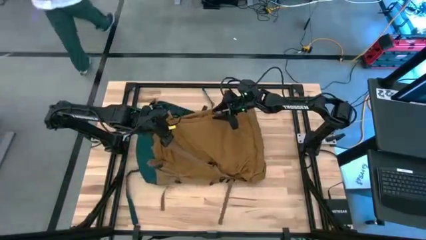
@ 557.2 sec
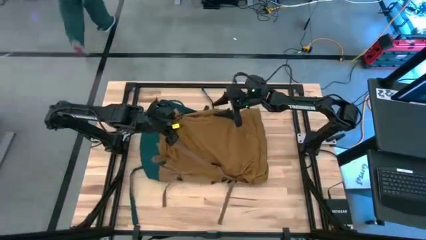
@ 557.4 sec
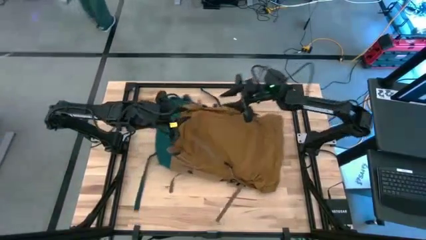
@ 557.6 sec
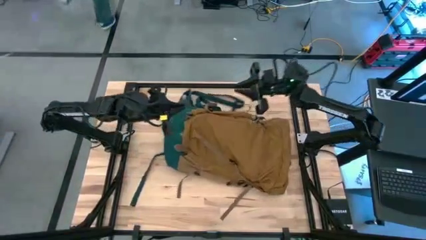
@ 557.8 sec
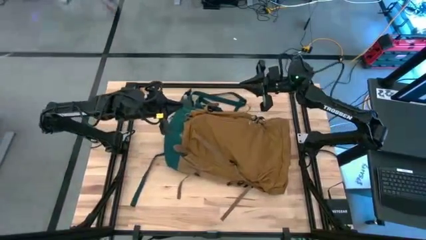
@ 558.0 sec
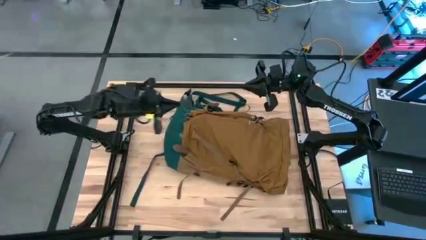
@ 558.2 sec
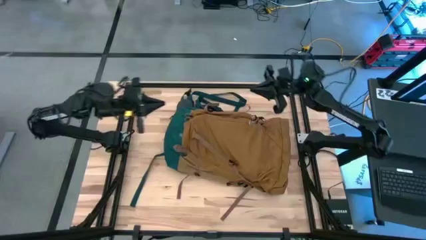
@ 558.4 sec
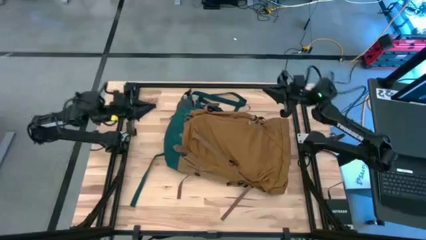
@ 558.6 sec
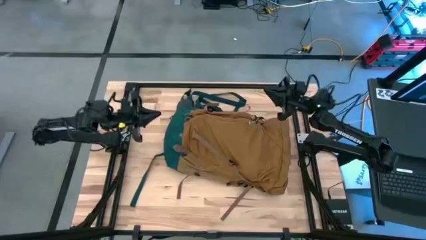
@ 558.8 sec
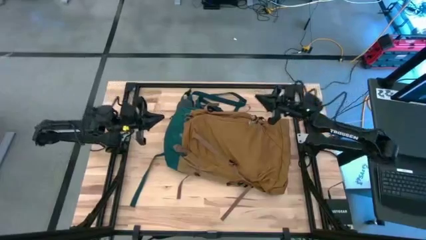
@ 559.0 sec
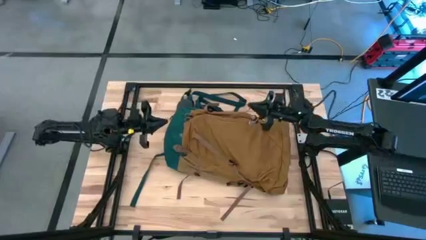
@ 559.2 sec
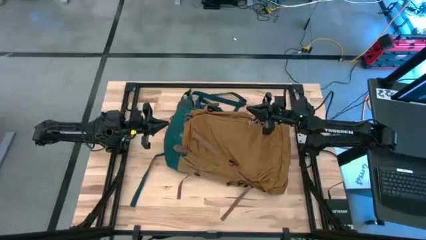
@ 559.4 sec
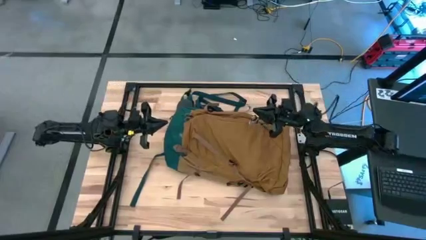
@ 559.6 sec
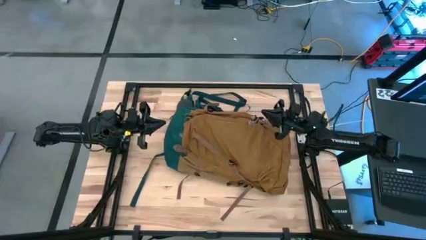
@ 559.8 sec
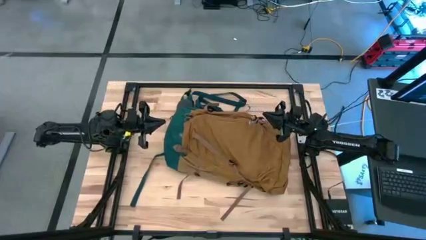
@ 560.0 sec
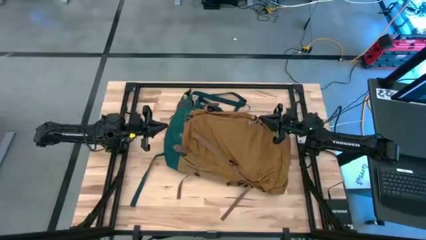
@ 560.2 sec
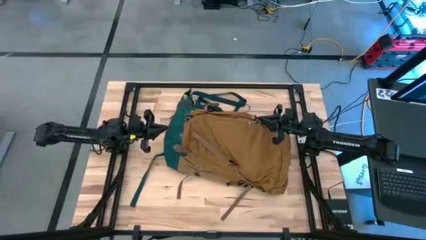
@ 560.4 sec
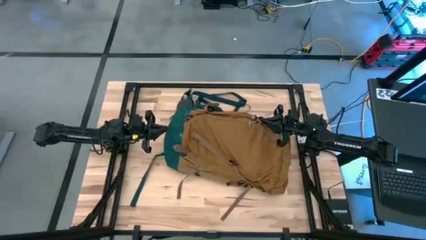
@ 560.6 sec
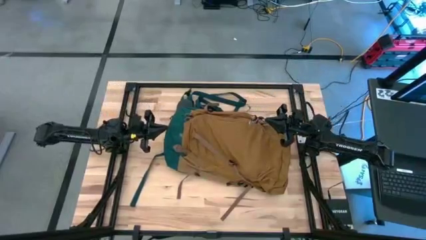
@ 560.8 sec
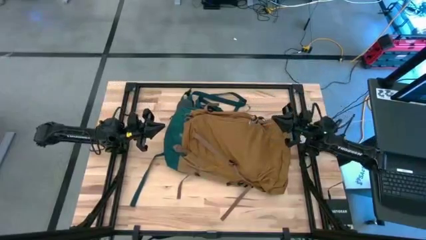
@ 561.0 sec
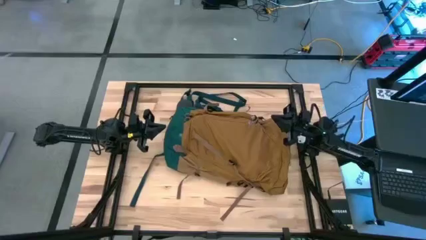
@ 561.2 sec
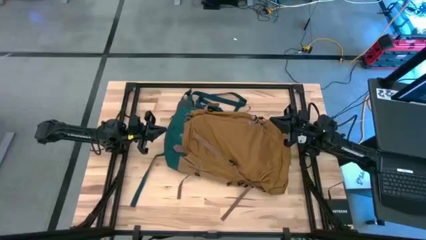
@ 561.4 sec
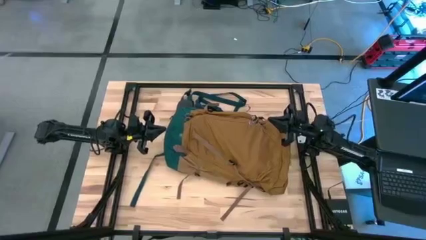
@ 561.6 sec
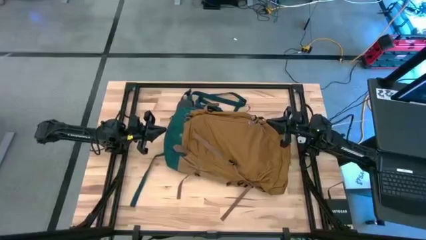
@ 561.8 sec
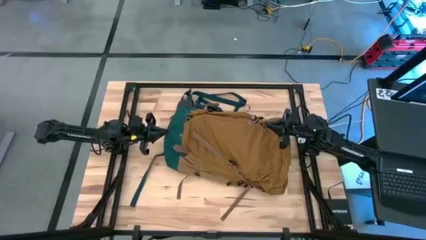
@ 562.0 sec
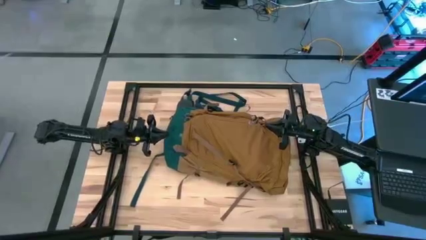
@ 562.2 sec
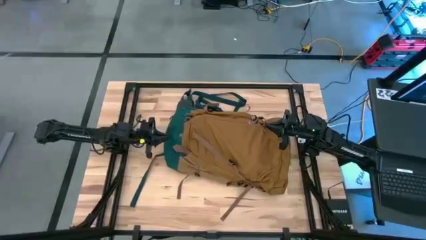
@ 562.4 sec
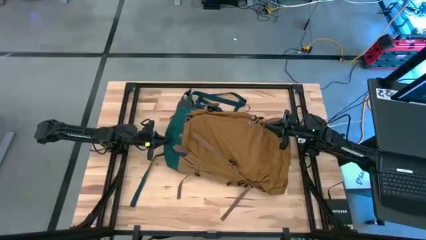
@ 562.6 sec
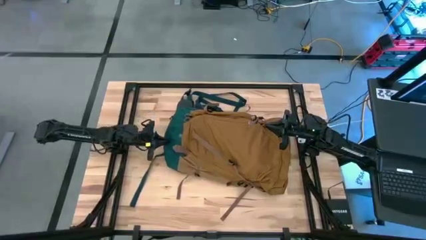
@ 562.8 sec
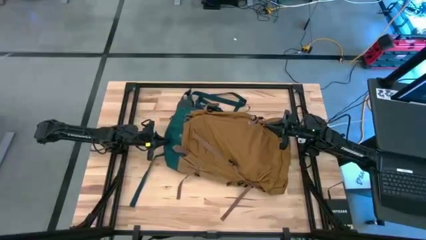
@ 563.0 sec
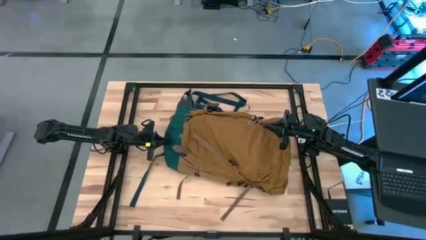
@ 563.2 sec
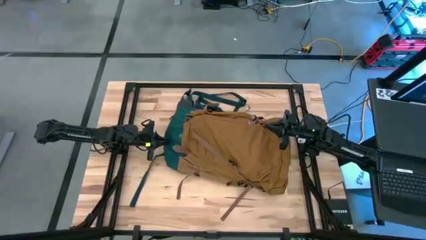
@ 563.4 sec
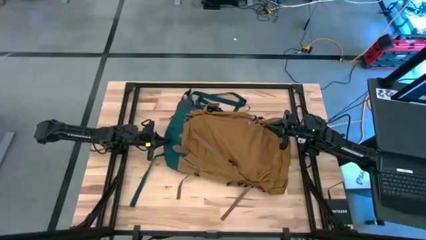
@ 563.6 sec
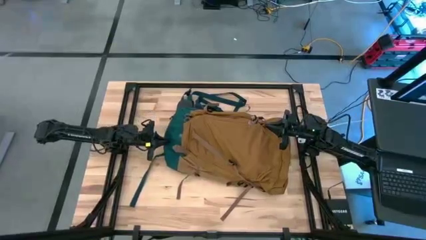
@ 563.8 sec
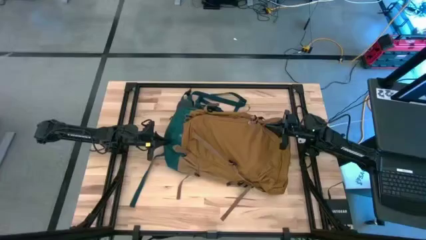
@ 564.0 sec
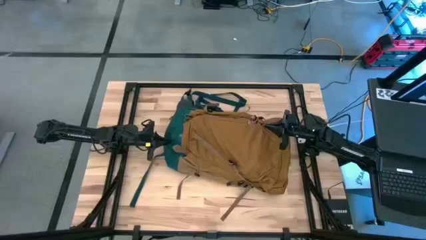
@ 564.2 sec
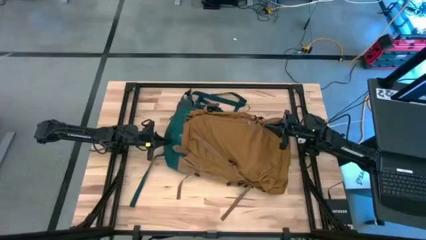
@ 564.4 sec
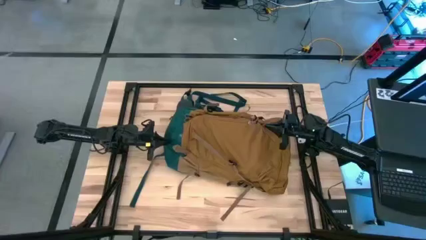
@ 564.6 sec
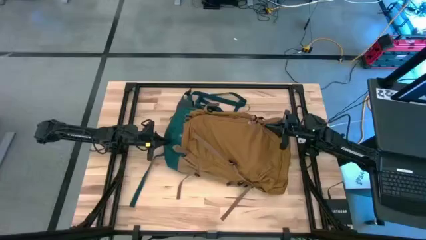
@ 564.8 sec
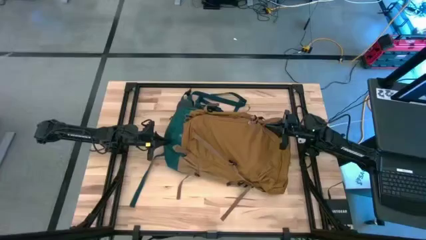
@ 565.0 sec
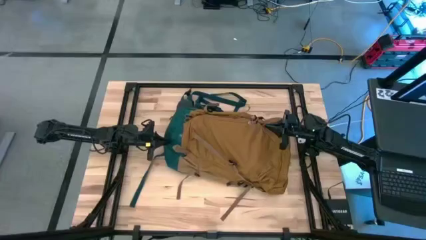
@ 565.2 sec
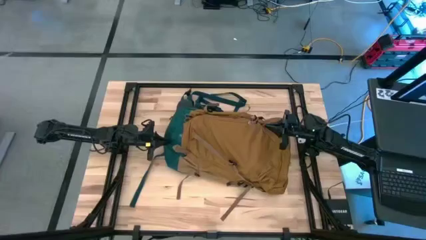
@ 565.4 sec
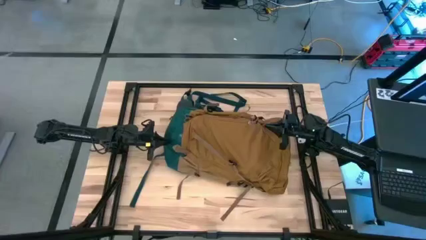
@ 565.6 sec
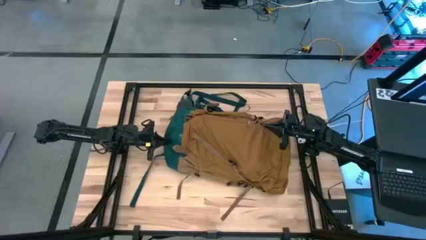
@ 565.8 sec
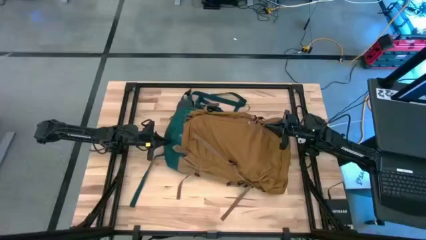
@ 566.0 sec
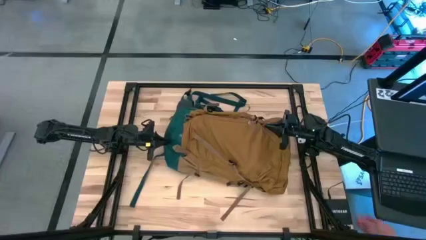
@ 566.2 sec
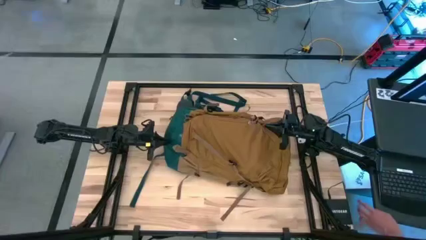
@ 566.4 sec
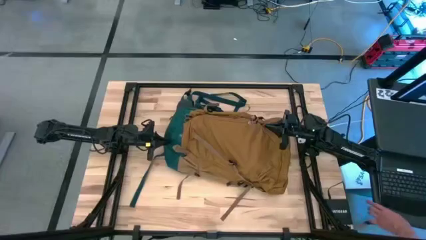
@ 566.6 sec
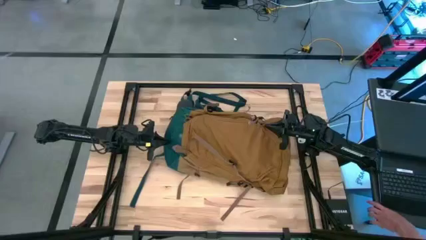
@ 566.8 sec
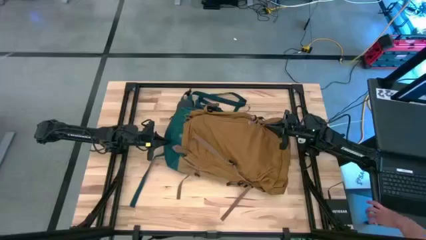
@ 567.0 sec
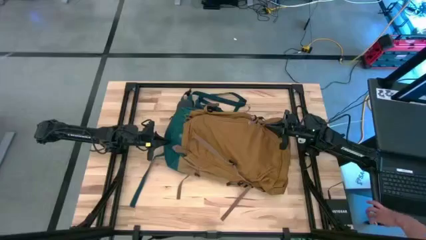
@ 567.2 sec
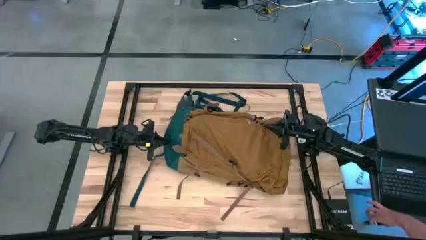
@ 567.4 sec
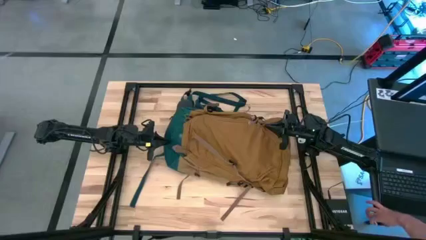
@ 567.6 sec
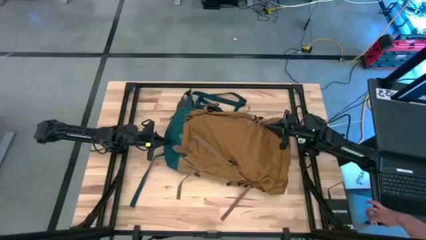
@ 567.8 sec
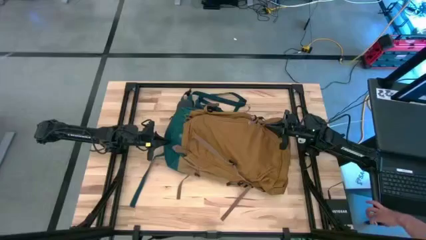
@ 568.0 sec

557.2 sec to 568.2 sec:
Task: Unpack backpack
Return to Home Position

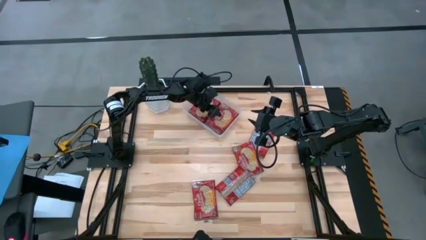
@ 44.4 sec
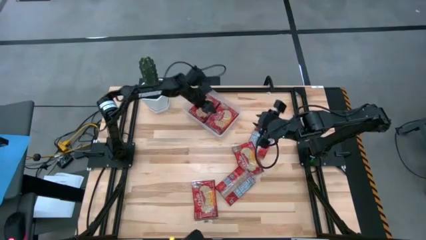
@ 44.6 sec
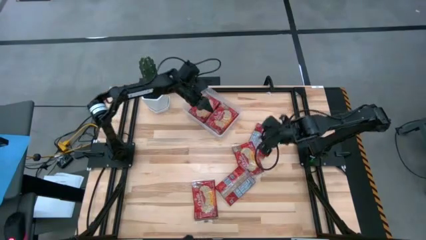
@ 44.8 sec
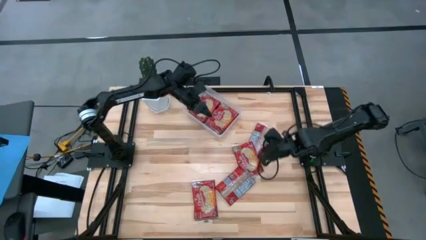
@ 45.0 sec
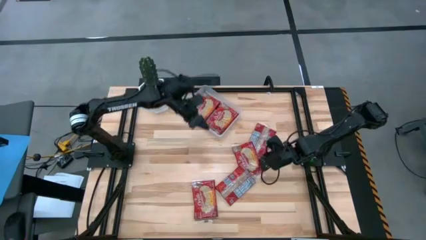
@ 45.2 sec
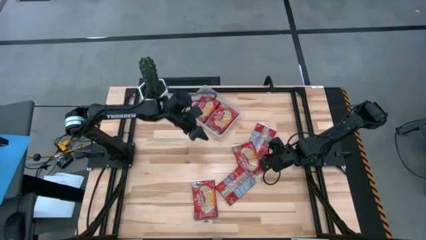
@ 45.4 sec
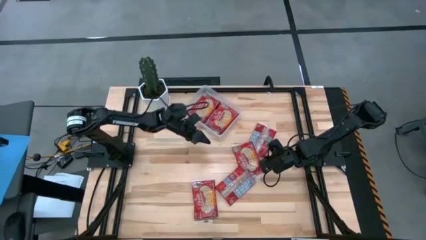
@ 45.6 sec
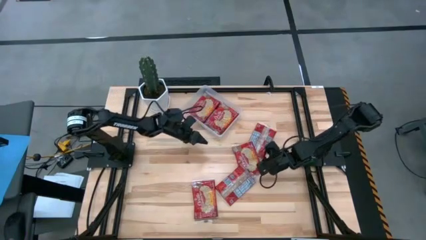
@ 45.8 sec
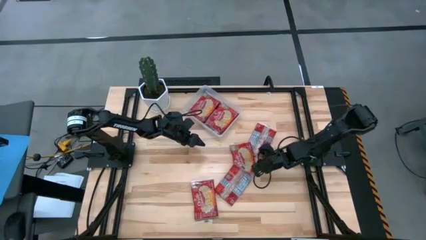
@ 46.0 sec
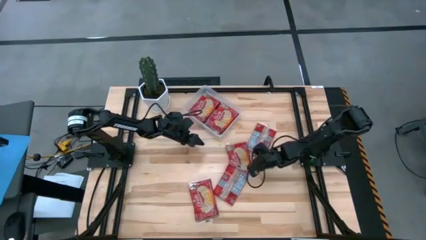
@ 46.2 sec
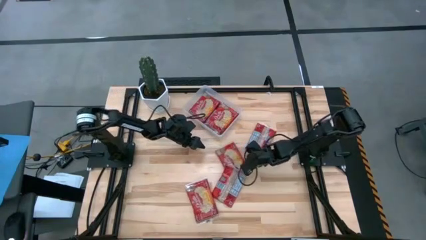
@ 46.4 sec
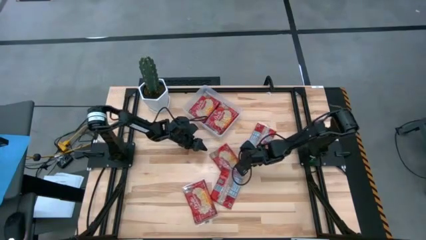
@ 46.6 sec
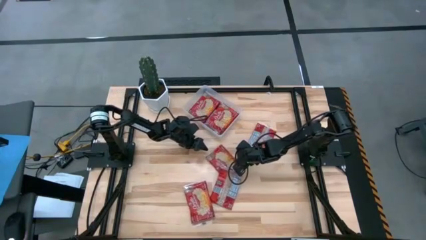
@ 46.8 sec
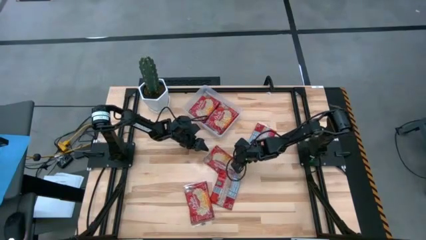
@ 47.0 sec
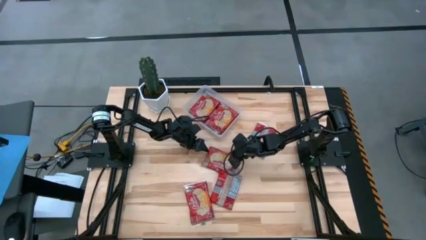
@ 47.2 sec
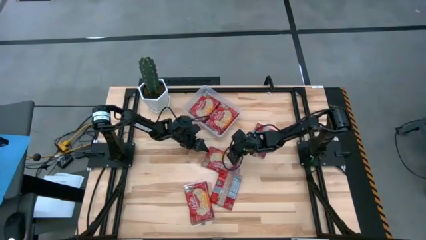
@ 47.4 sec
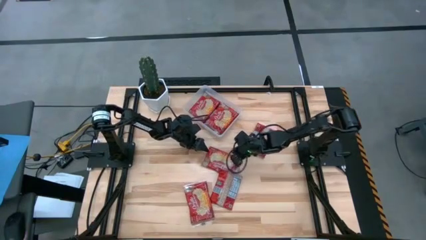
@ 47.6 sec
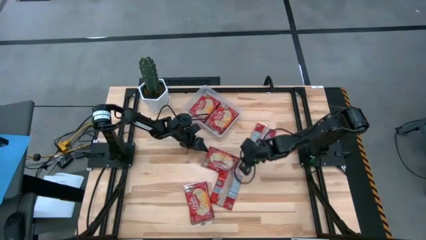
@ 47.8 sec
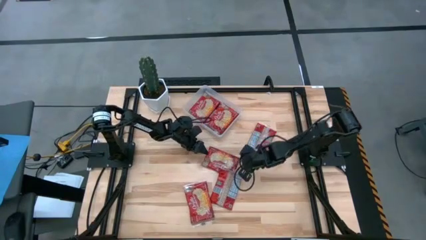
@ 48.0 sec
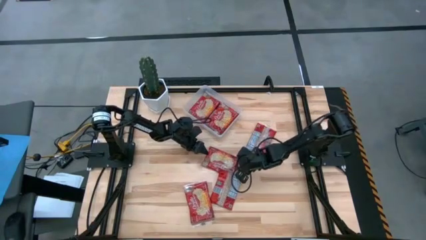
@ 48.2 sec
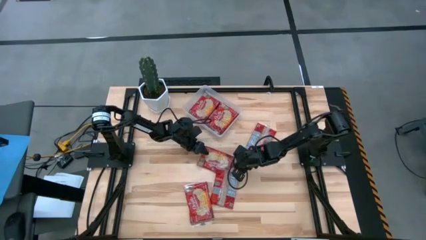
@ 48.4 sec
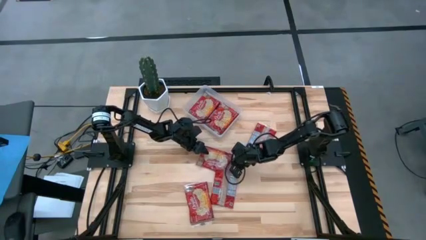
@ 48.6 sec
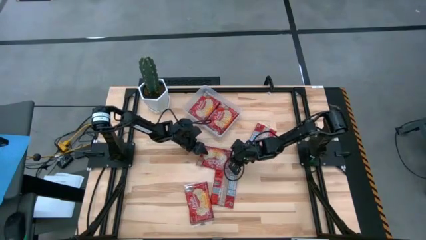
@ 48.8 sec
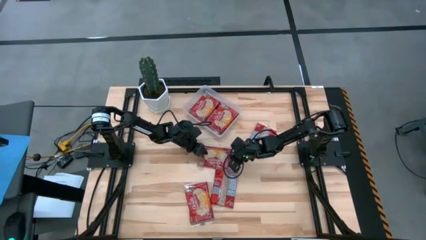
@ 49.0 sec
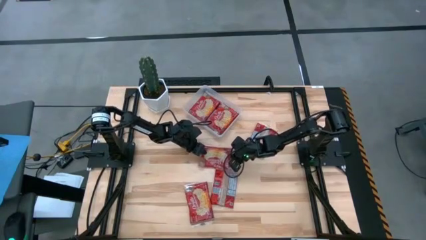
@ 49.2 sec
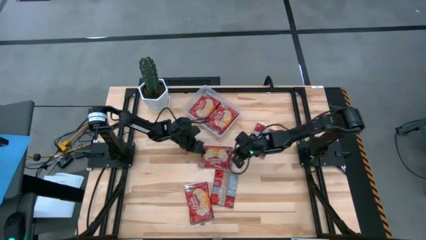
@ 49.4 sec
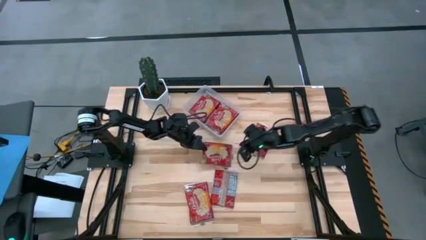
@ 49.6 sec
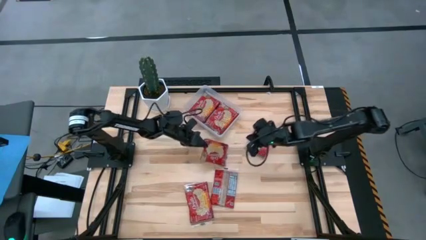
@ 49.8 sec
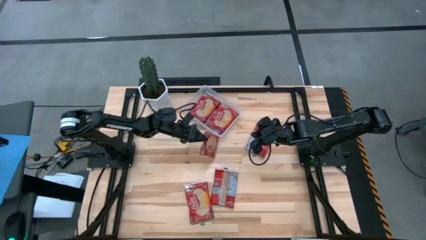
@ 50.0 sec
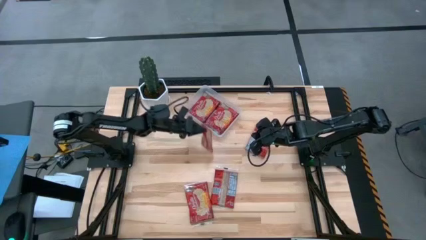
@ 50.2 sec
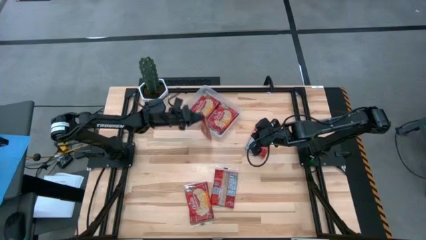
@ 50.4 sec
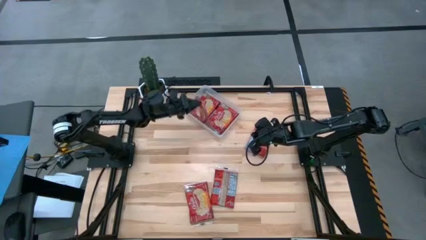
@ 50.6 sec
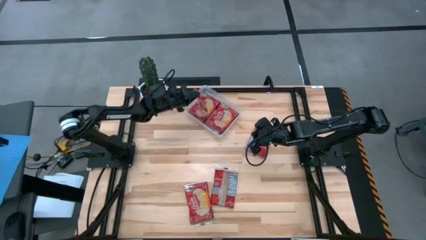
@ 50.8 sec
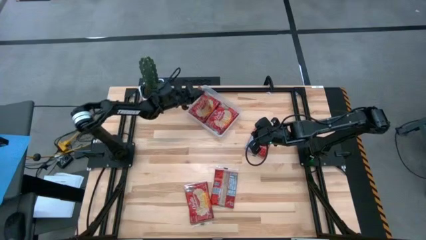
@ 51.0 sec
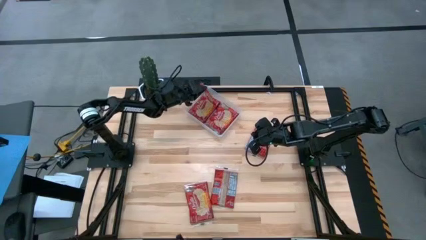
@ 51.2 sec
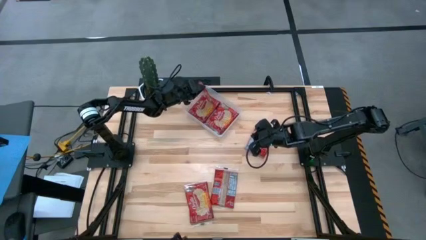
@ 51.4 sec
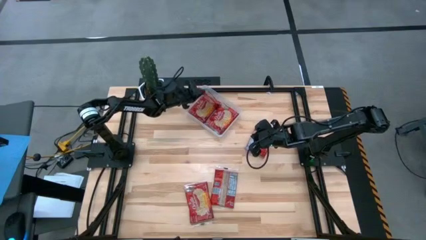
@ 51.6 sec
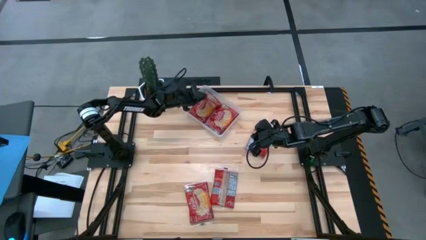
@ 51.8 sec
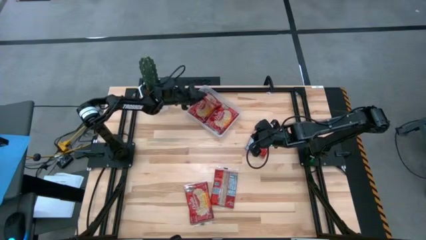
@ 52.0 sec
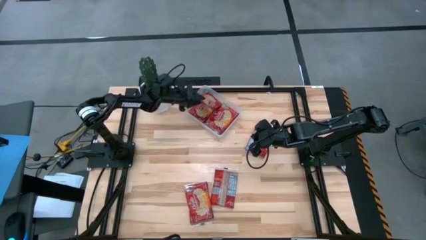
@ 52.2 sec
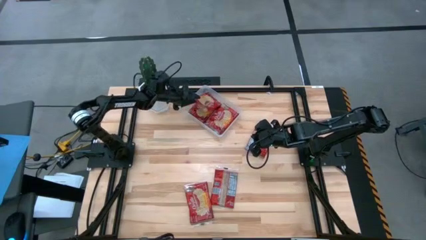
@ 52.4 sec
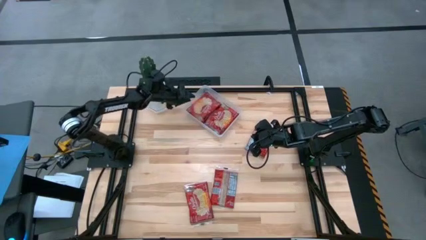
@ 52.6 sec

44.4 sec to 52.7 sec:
Task: Sort popcorn bags into baskets
Put the red popcorn bag into the transparent bin
